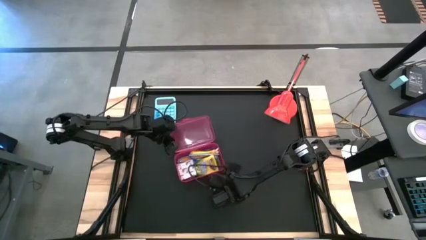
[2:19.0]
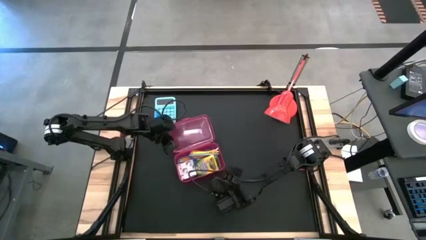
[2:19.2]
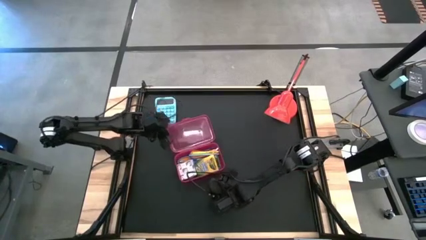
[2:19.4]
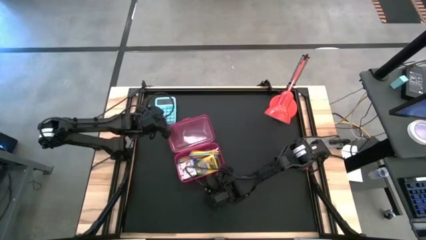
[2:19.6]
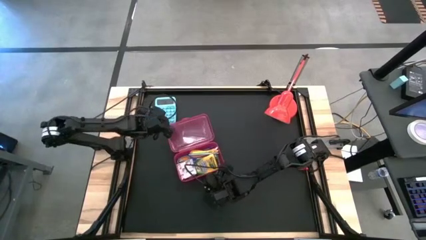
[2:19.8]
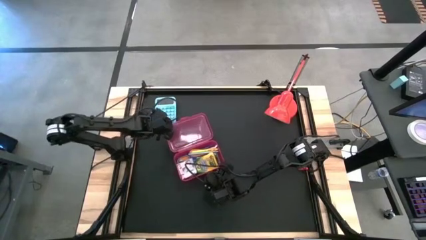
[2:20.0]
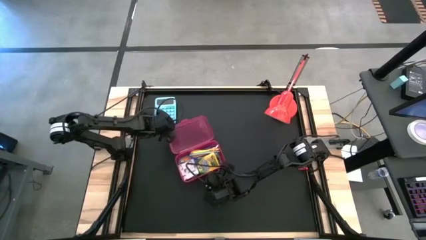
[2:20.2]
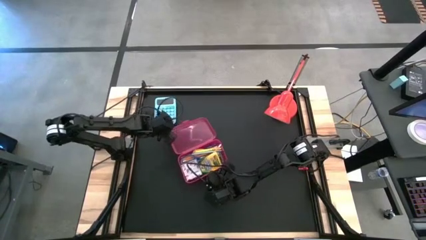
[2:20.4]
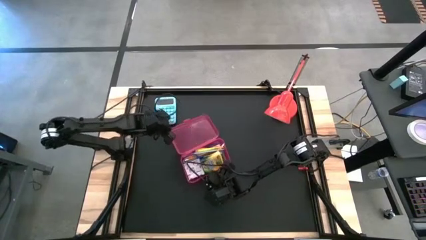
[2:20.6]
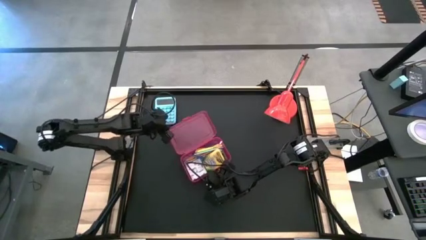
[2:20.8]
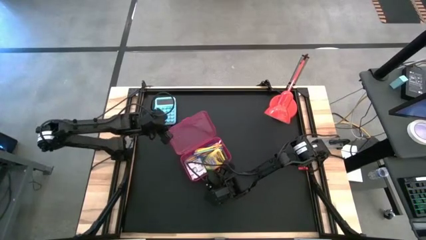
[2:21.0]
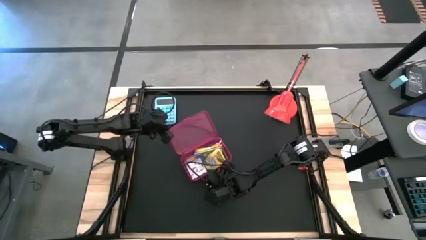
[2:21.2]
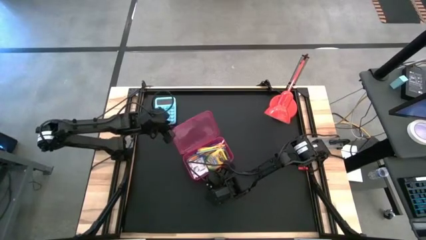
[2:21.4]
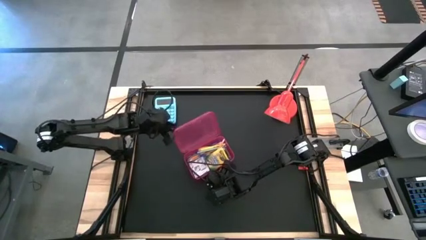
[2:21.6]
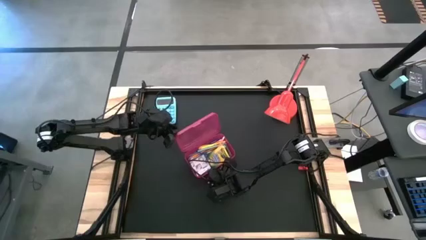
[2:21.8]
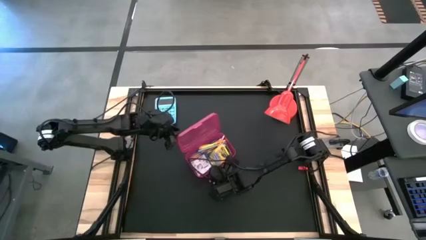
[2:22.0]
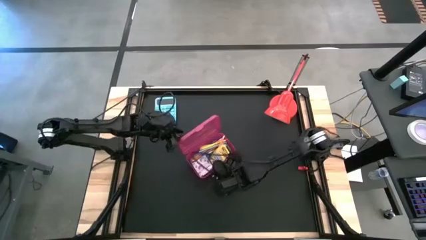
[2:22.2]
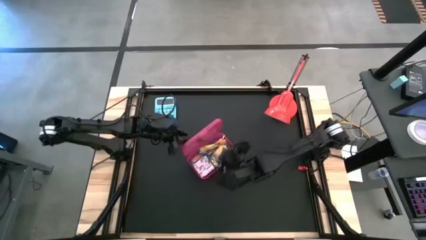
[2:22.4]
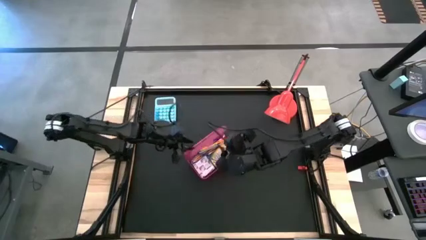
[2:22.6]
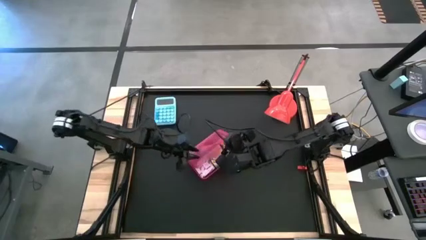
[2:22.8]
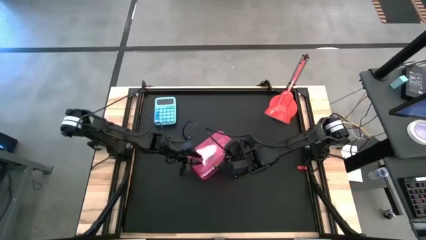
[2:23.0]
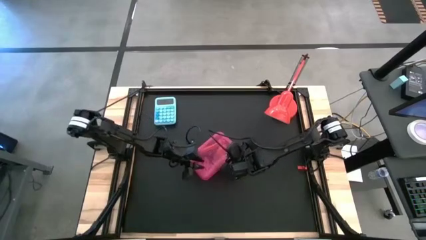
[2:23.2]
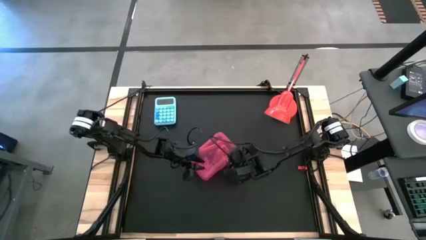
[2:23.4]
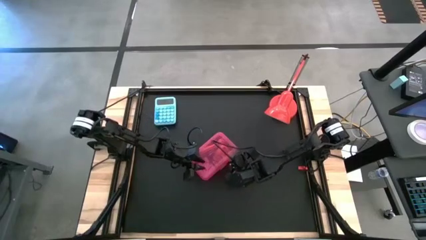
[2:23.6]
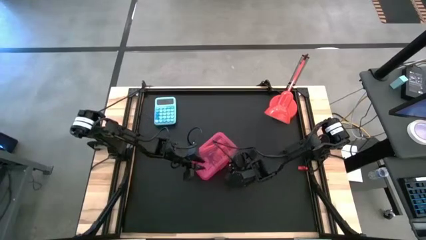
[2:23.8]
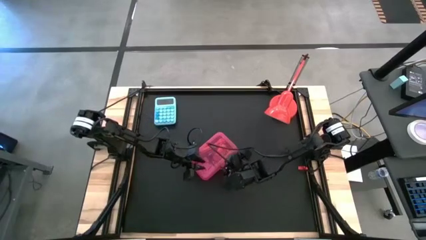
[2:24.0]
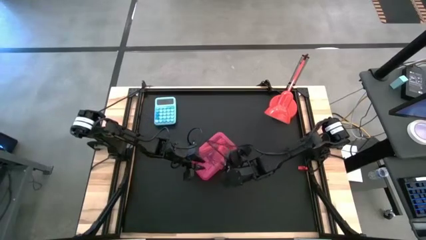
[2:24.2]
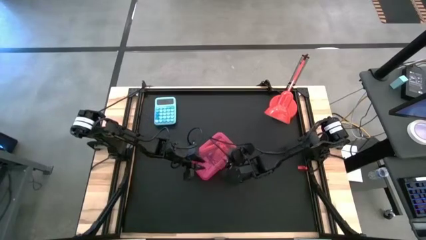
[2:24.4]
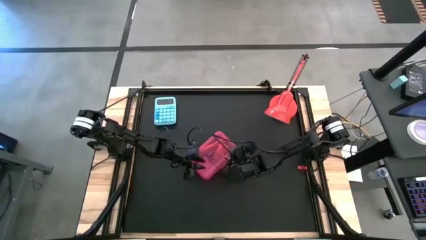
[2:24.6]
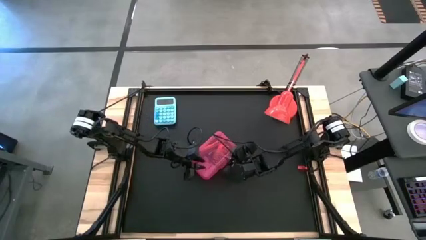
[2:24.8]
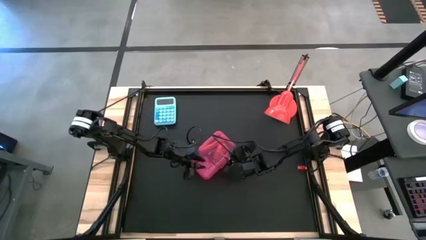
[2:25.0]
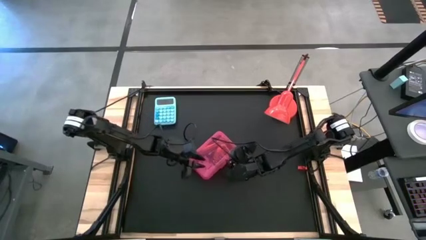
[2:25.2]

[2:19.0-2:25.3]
Task: Pack school essentials
Close the pink supply box

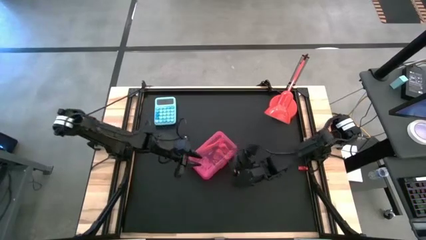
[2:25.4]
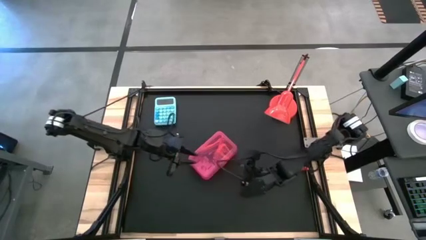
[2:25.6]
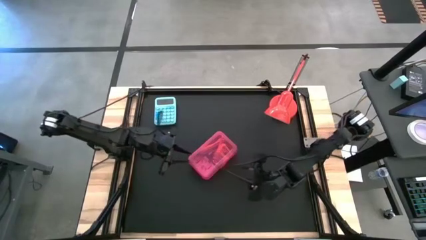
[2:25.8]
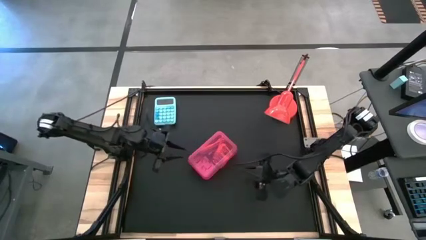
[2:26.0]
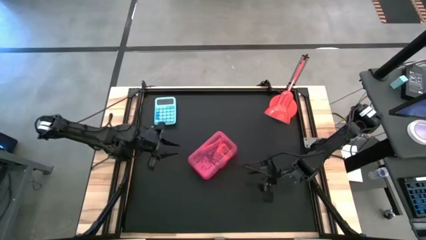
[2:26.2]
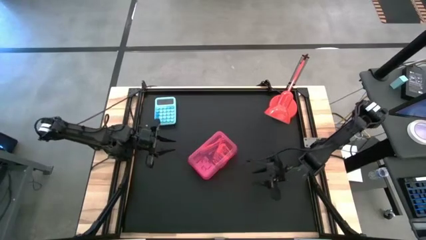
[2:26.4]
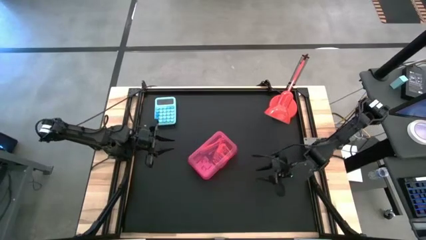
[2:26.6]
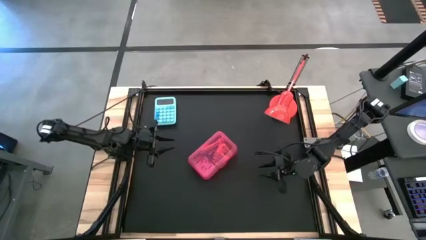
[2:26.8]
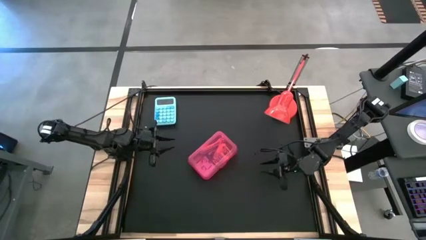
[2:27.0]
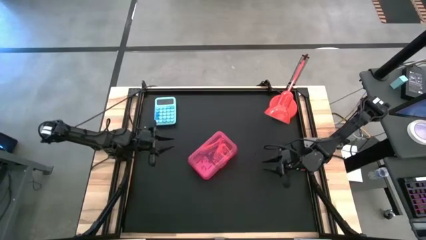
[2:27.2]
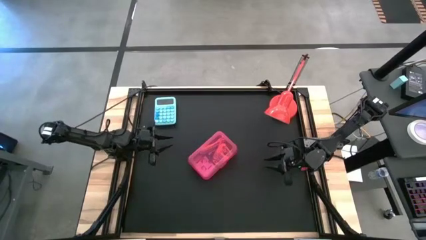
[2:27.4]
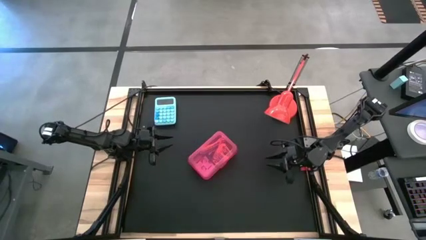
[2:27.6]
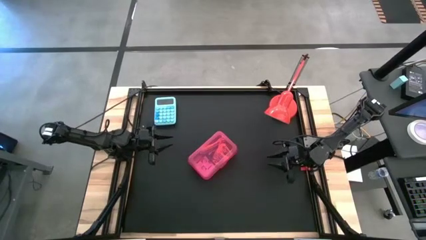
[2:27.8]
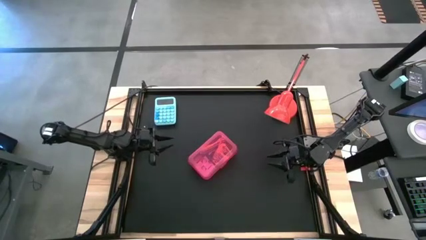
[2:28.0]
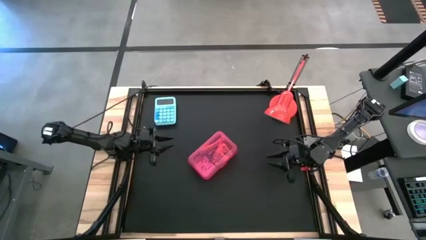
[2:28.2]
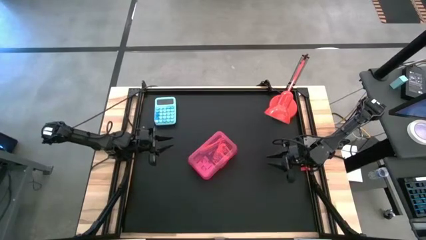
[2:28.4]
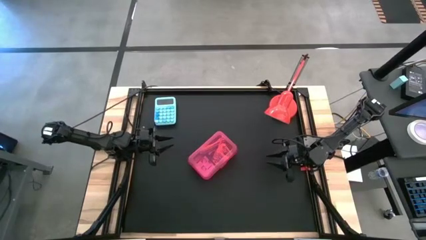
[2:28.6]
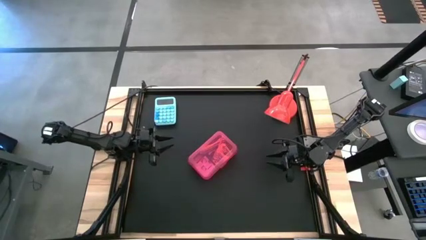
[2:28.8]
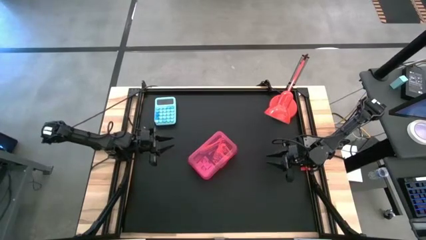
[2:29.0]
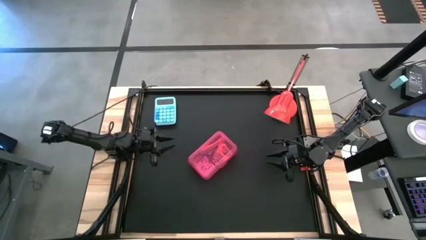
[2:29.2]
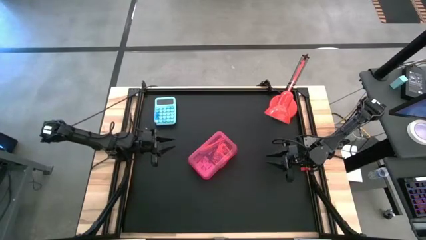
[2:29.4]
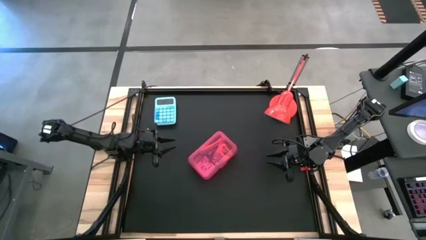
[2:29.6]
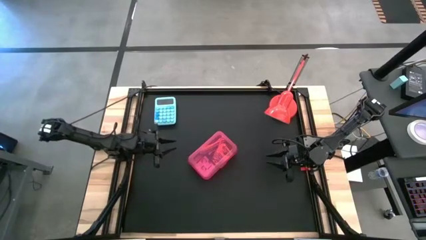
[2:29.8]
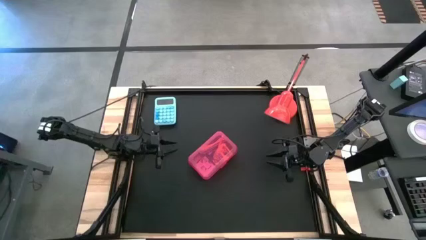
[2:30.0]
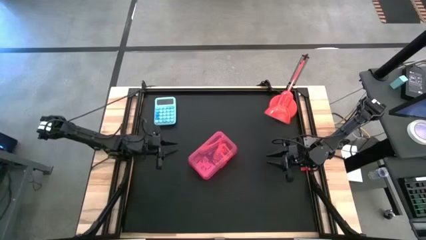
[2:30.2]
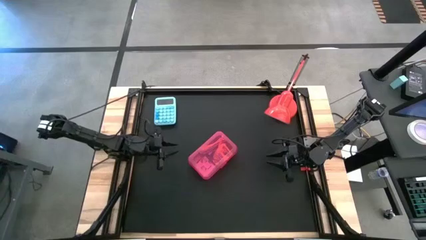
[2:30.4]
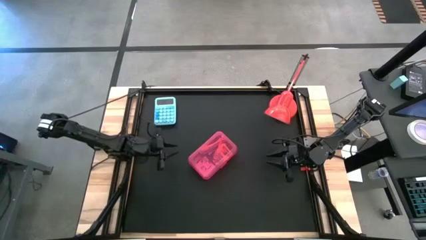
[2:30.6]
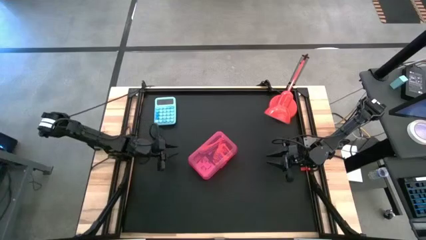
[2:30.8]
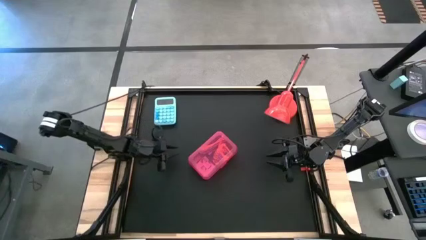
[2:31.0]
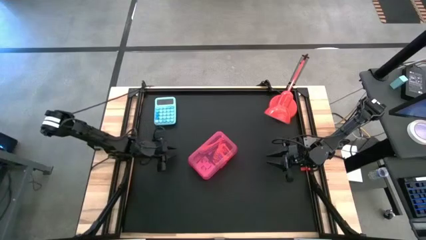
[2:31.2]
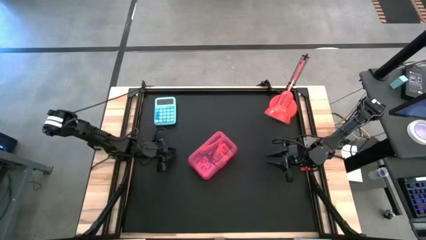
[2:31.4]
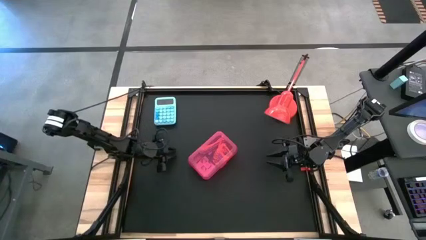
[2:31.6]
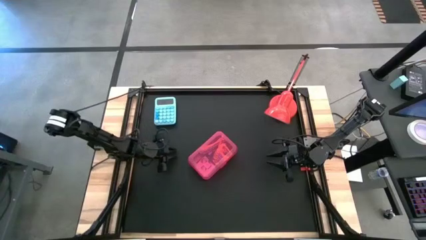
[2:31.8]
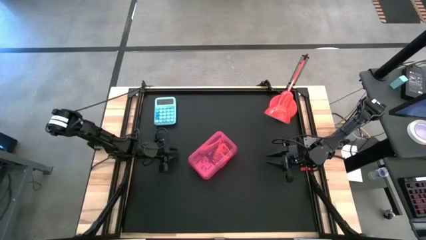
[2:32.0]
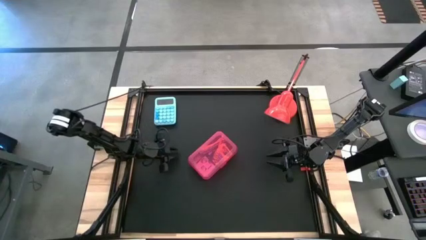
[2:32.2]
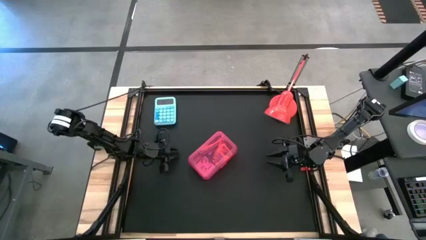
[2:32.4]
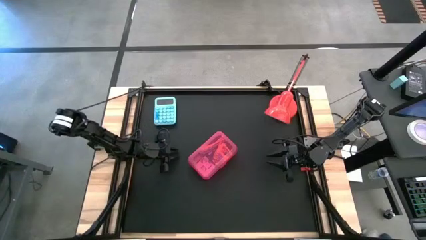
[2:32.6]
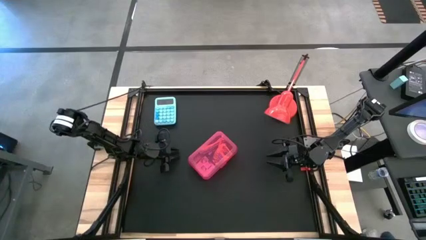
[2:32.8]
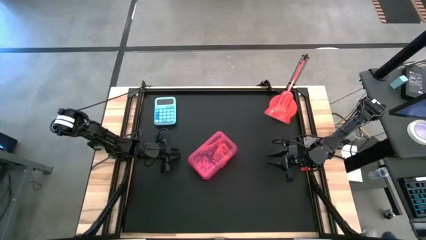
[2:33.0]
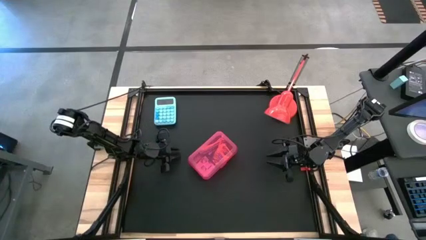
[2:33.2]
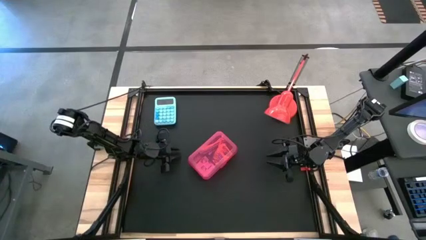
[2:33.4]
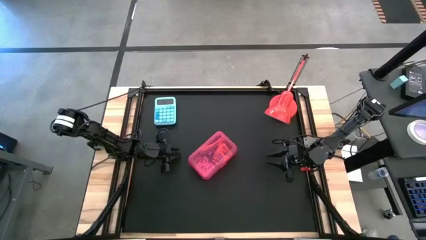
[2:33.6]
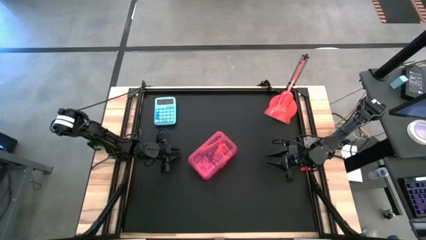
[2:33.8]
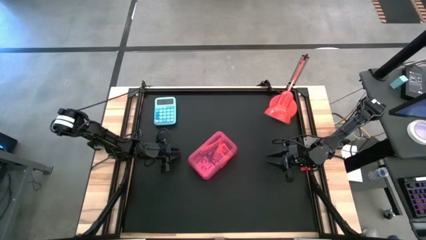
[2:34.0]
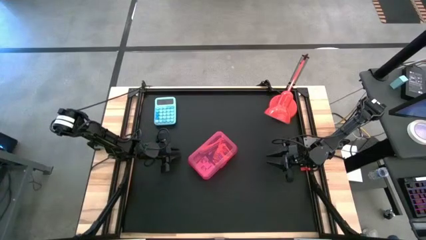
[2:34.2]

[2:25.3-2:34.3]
Return to Home Position

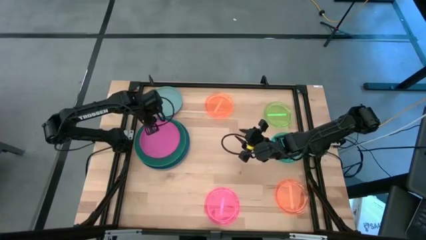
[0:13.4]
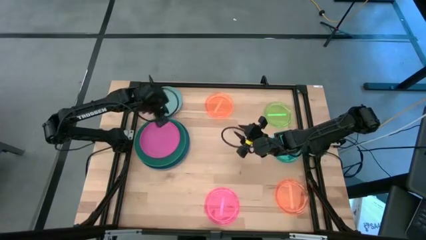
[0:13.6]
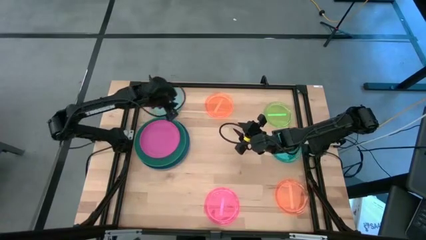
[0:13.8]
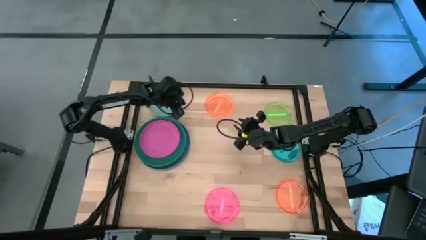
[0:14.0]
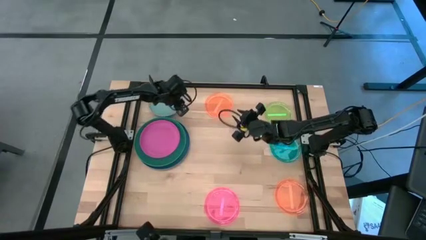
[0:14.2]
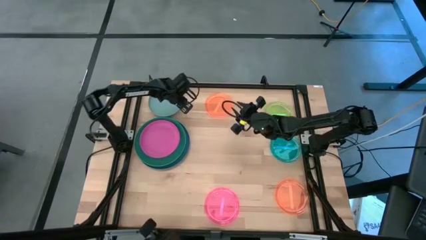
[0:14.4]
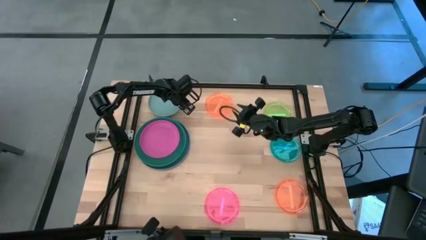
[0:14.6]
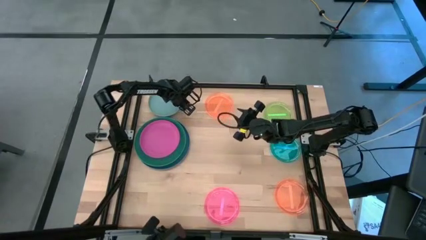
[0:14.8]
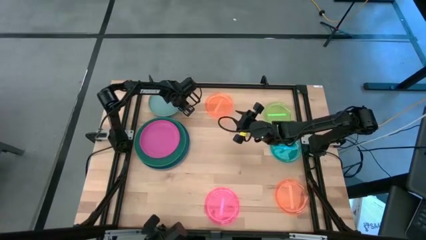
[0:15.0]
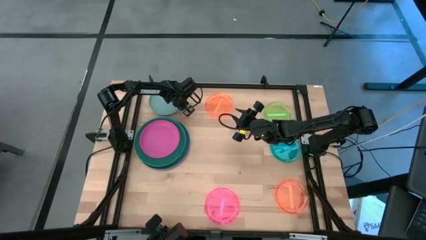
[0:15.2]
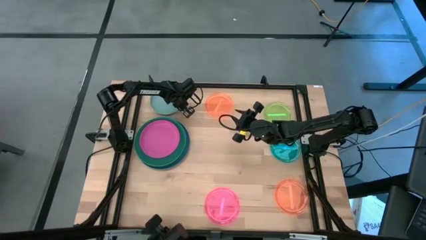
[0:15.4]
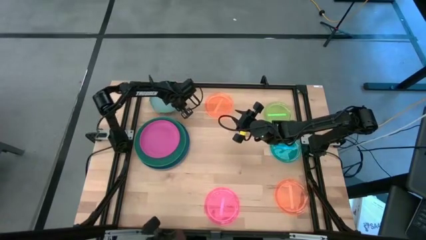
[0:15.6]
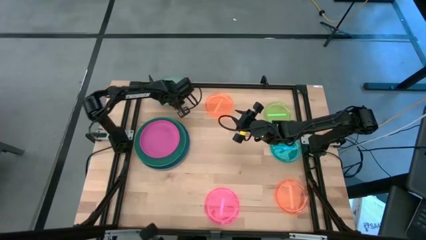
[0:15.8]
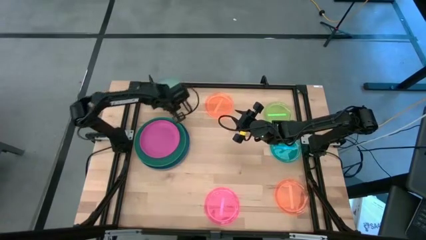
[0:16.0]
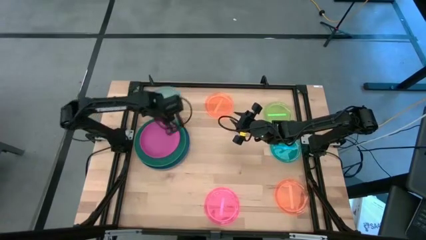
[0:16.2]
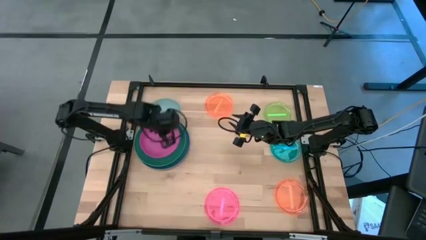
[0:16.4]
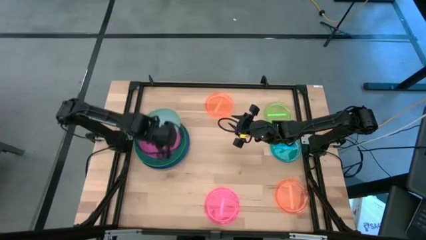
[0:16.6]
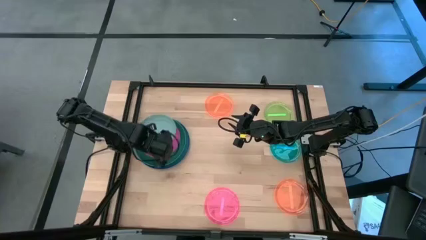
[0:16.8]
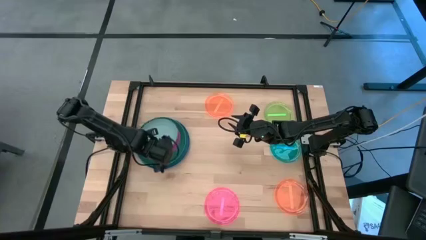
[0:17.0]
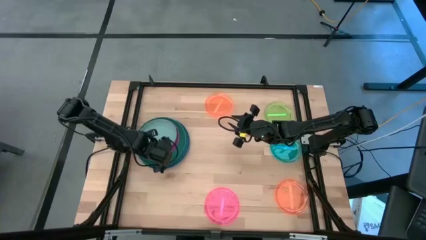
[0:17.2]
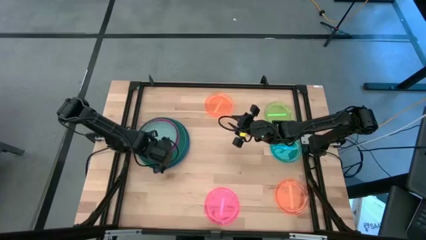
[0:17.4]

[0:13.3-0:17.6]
Task: Stack plastic plates
Stack the medium light blue plate on top of the medium pink plate
